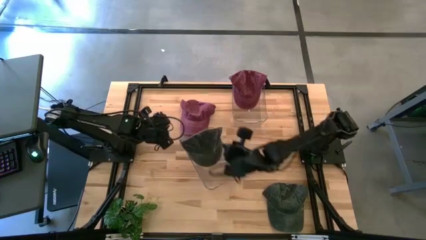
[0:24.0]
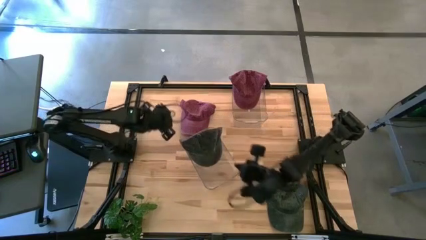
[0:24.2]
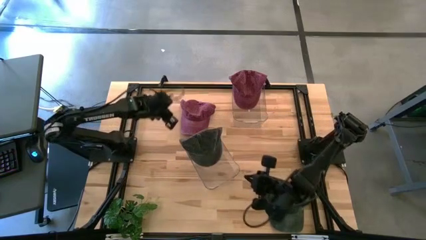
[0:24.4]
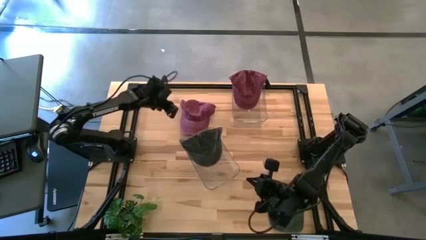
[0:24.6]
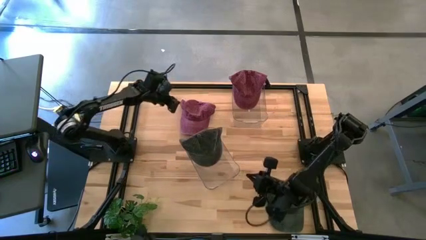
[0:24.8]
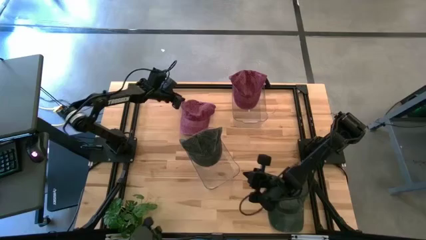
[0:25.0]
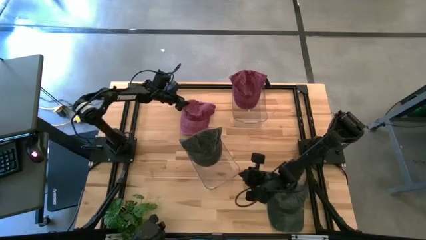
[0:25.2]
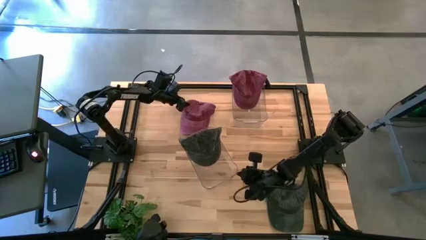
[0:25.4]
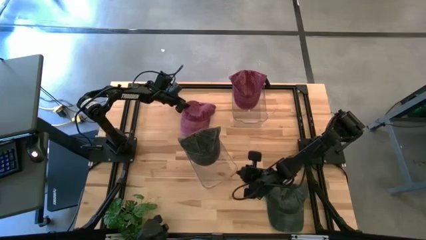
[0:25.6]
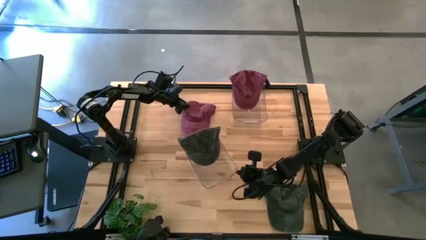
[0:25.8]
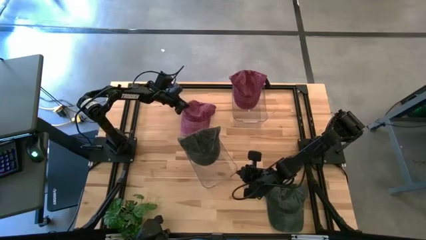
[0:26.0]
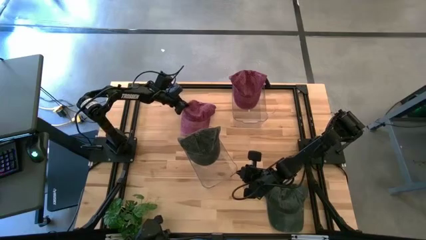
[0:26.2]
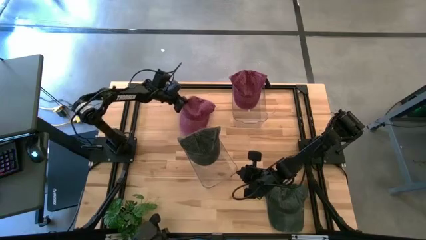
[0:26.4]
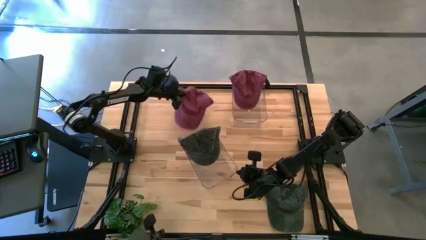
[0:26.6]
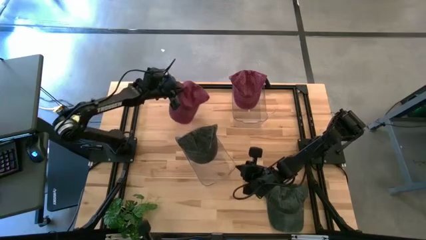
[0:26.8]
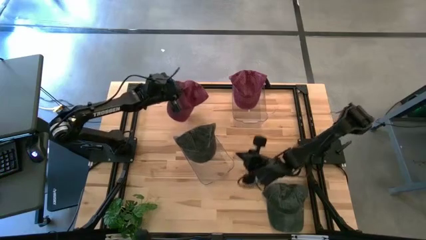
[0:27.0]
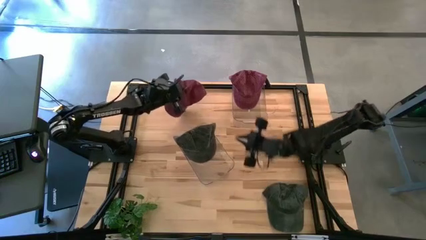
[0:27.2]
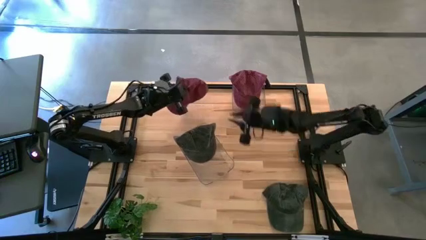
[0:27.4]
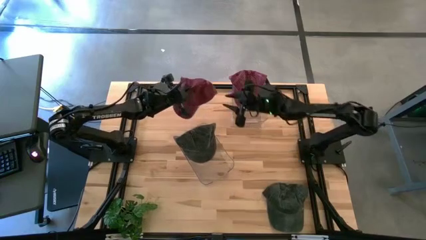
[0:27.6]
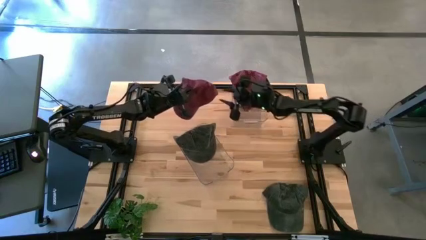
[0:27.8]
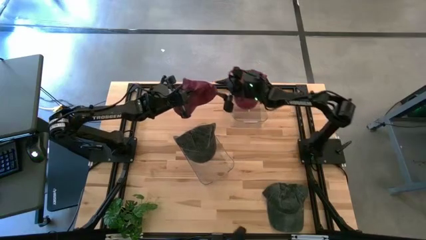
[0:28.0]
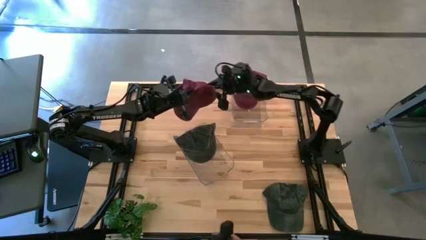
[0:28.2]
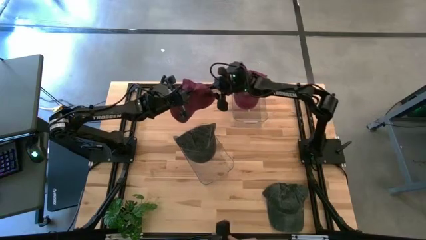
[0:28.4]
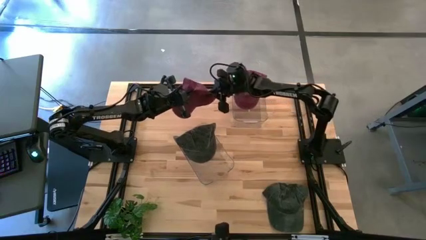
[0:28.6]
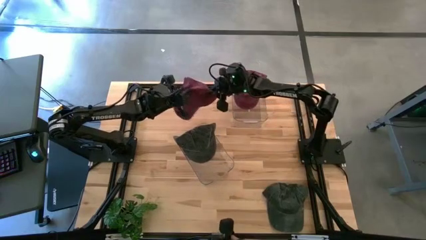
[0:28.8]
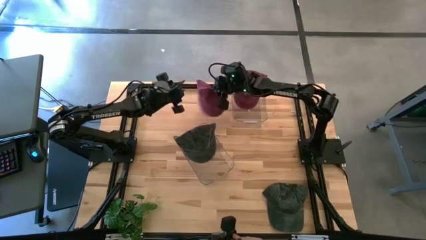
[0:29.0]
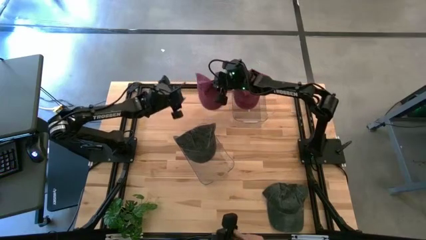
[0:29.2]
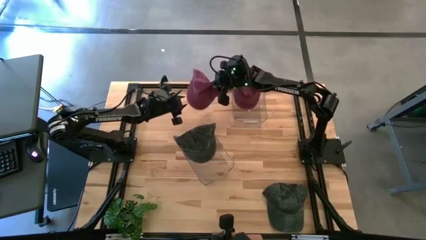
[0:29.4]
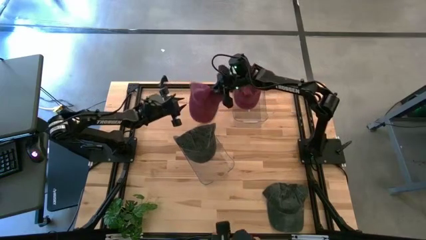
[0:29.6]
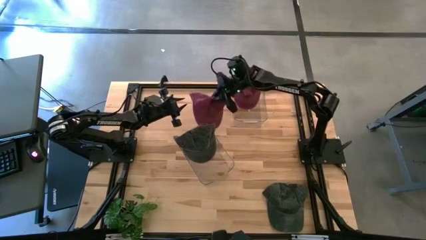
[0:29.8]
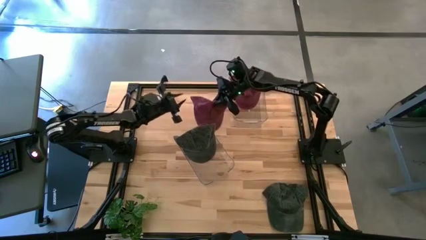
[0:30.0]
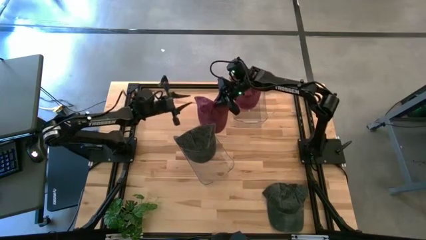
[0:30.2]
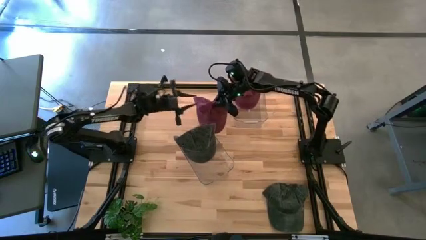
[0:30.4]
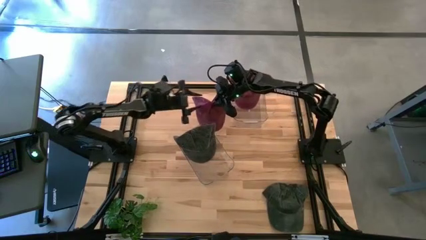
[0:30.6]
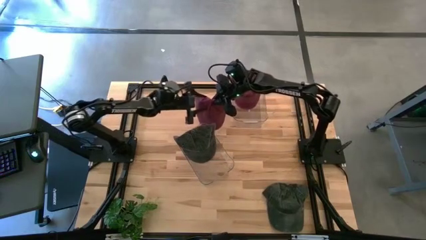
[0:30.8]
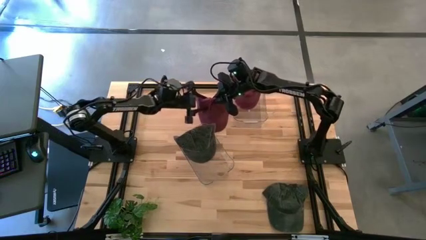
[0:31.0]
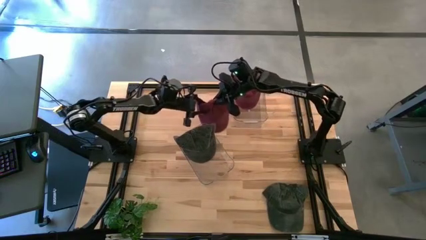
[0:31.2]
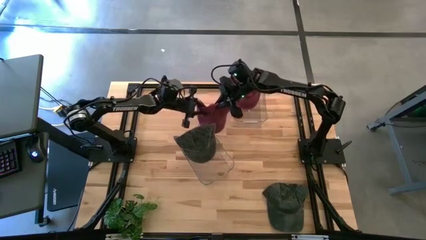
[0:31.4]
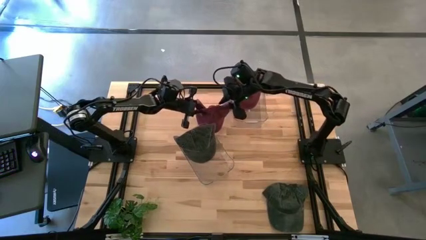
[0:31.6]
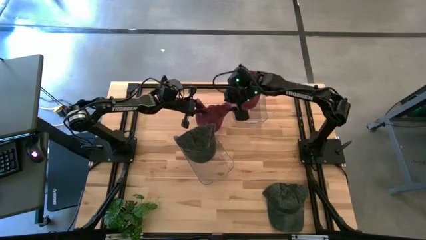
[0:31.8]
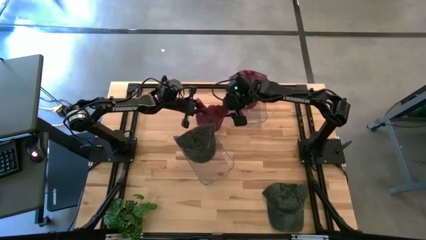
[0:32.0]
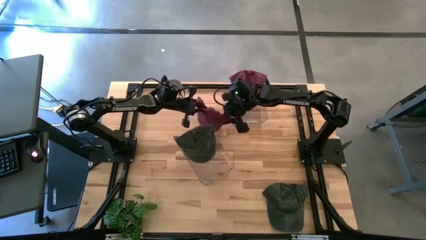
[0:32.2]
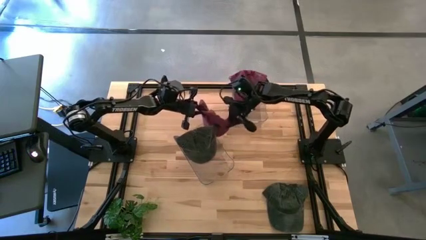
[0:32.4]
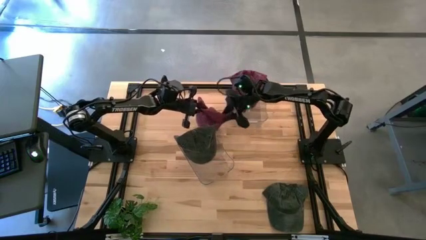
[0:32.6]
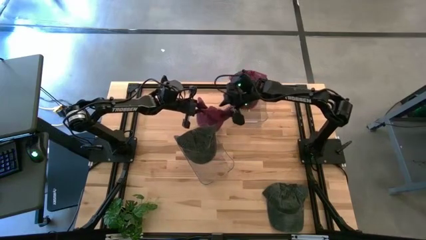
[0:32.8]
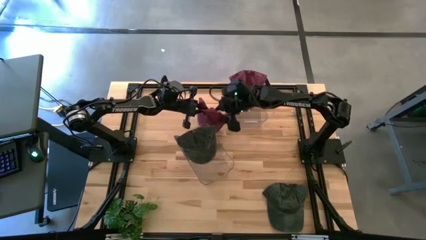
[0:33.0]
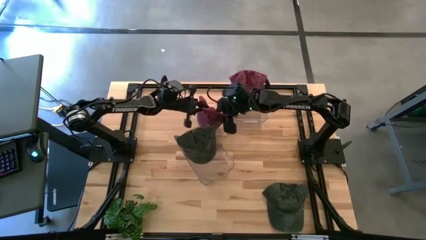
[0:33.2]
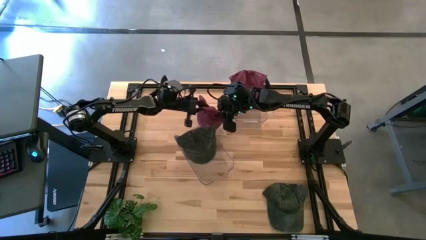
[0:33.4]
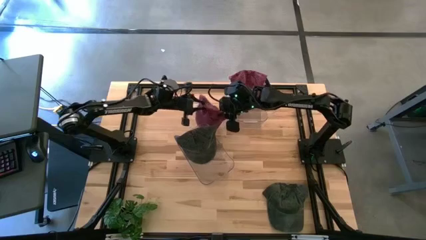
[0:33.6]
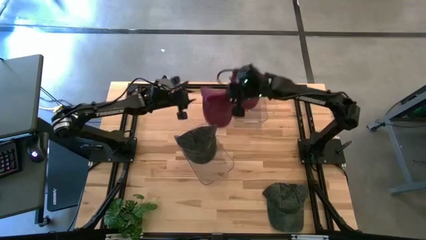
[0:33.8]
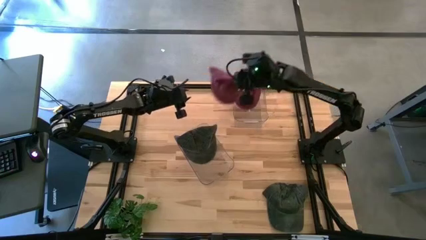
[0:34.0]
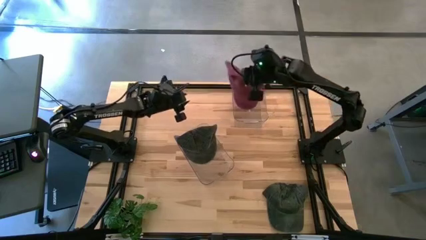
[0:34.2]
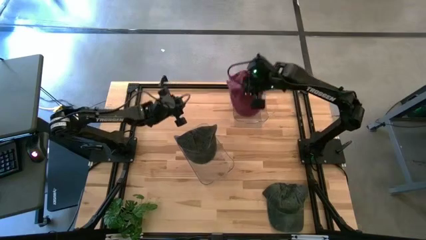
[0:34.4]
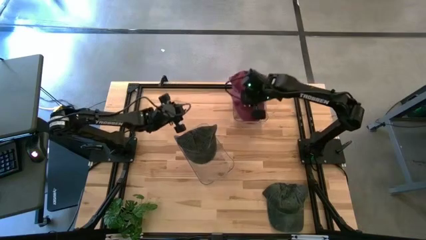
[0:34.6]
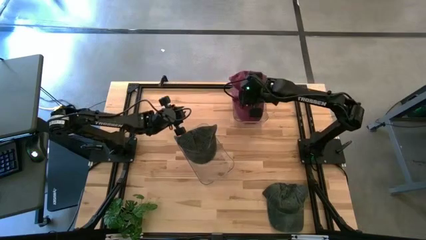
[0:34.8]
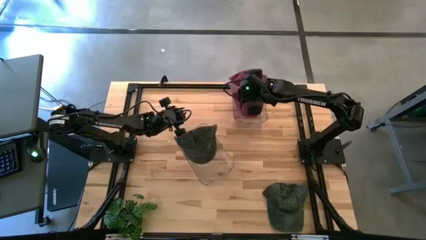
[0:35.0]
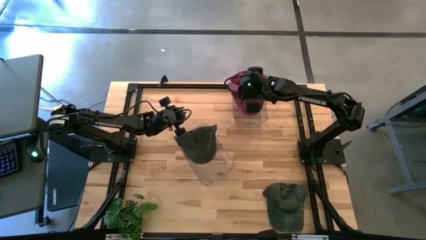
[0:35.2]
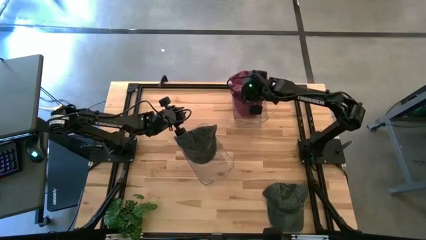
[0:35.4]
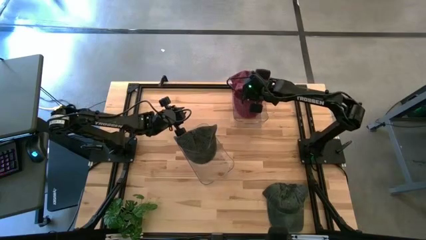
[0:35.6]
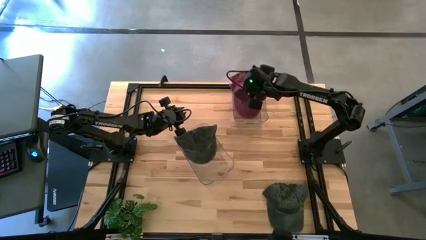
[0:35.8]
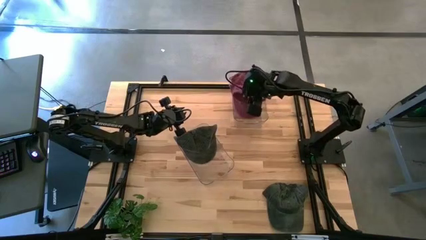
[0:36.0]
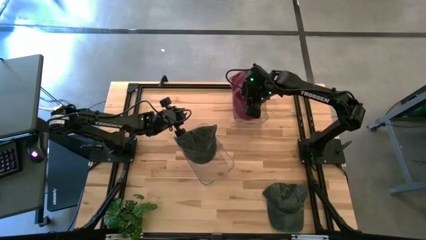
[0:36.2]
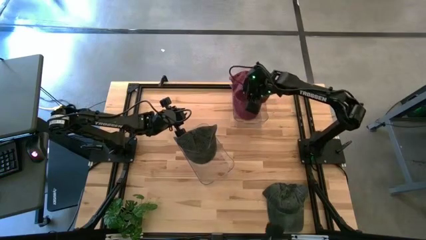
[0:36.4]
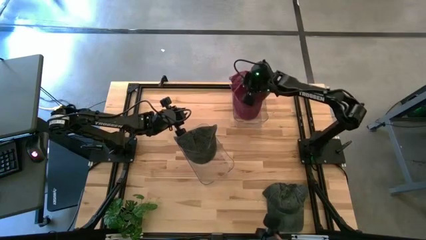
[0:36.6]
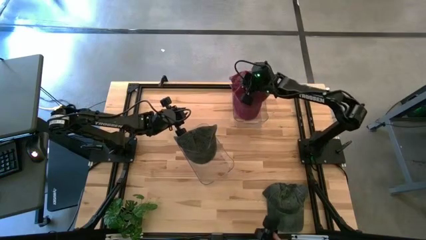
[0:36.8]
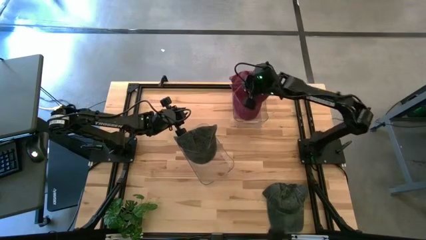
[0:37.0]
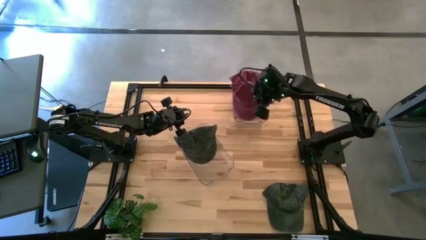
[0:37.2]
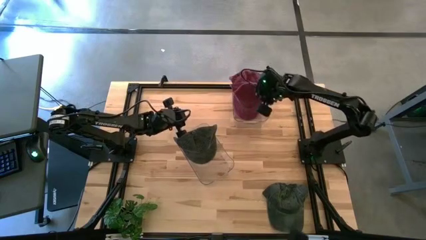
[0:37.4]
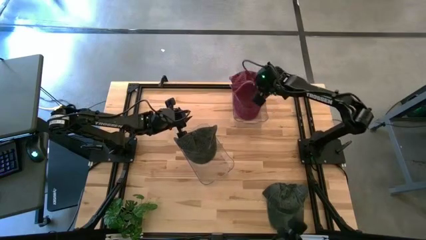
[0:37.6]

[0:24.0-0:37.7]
Task: Pick & Place hat
Put the red cap into the top right transparent bin

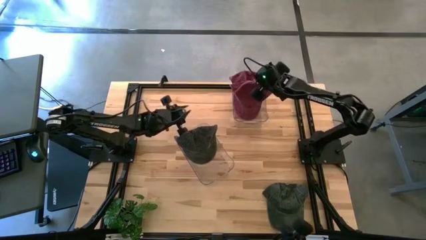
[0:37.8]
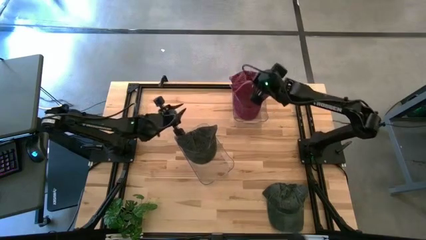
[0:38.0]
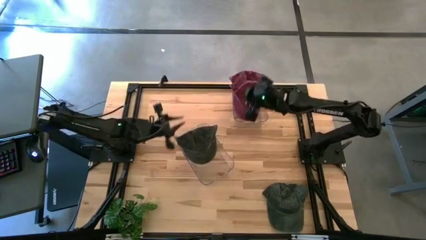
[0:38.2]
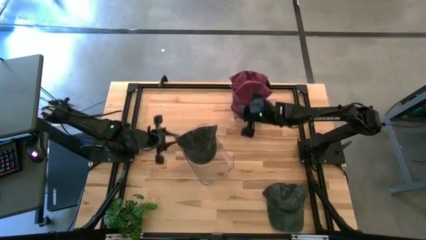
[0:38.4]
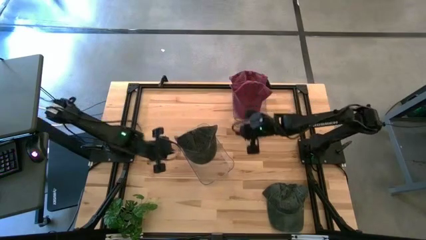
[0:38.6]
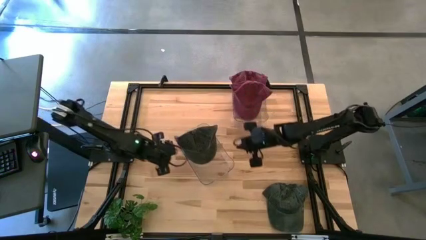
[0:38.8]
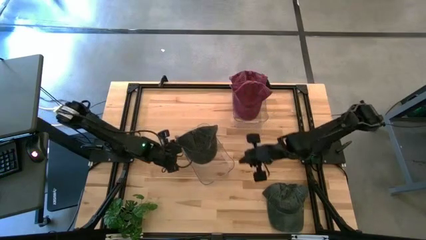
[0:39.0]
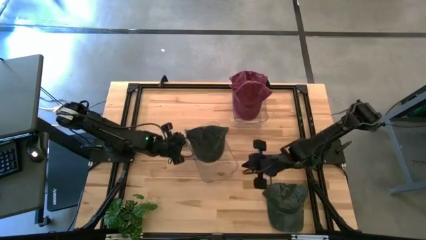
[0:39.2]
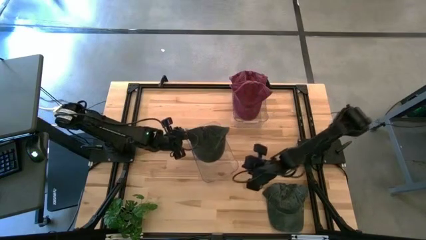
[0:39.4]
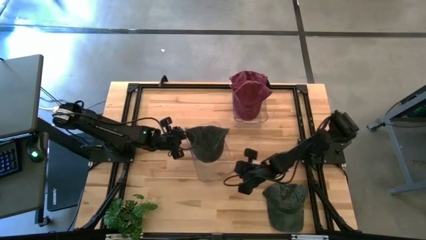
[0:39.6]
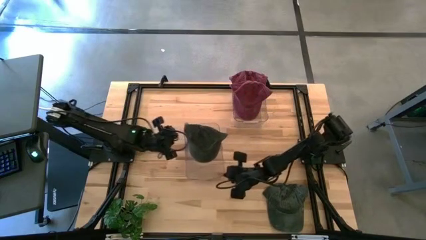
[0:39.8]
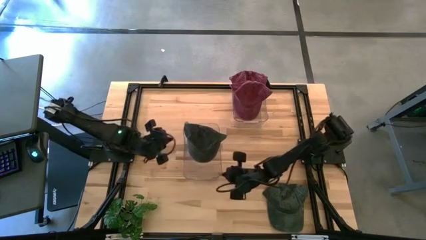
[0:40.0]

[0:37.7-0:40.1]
Adjust the bottom transparent bin

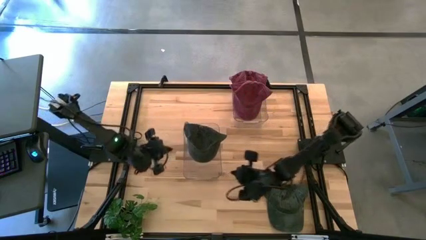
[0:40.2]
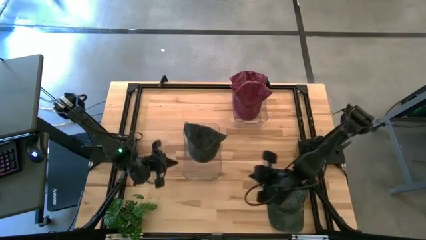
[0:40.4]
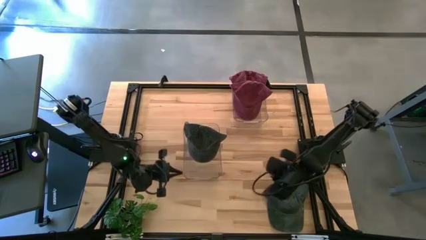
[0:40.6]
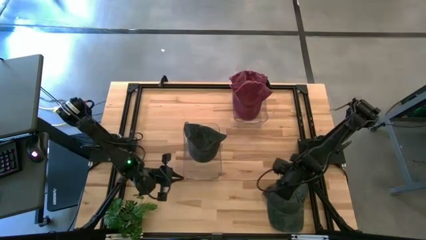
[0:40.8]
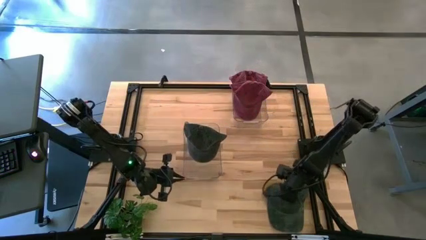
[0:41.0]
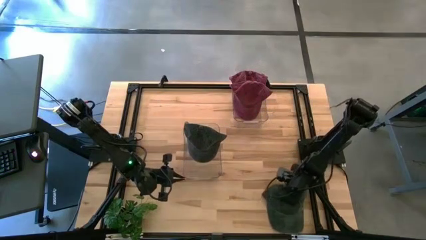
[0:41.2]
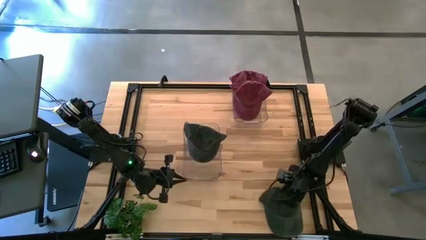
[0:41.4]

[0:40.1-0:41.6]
Put the black cap into the bottom transparent bin
